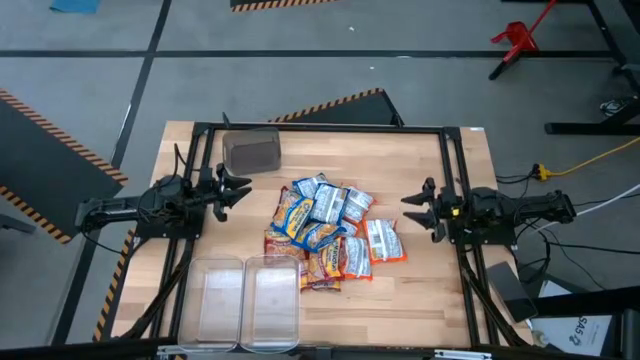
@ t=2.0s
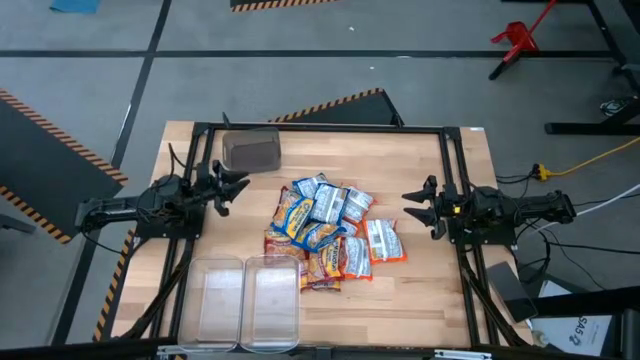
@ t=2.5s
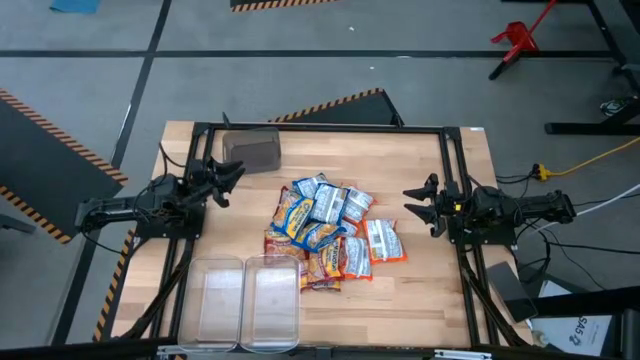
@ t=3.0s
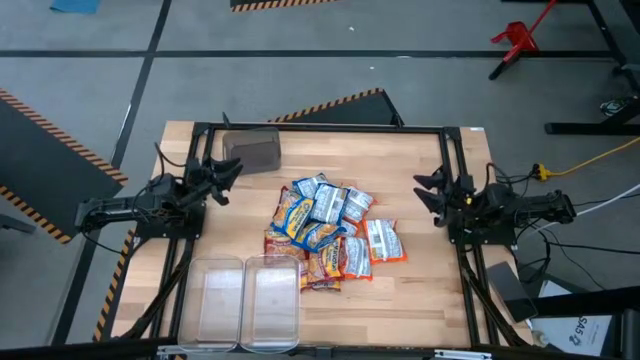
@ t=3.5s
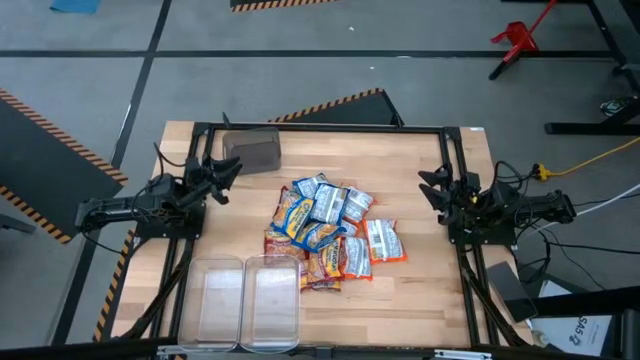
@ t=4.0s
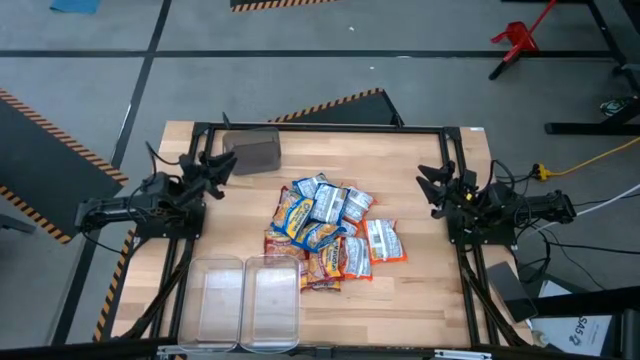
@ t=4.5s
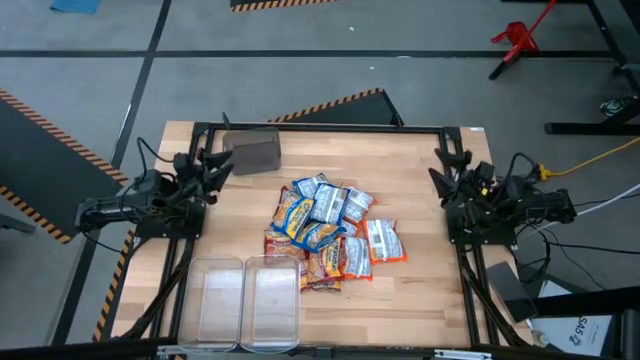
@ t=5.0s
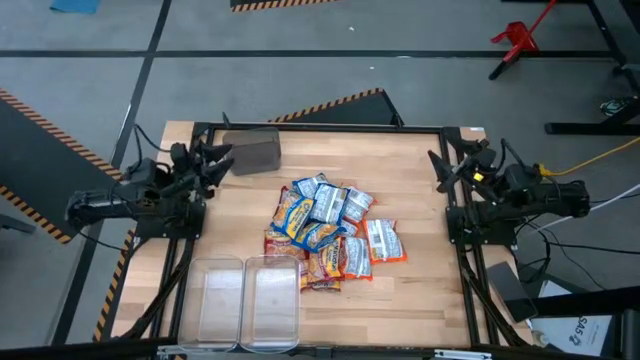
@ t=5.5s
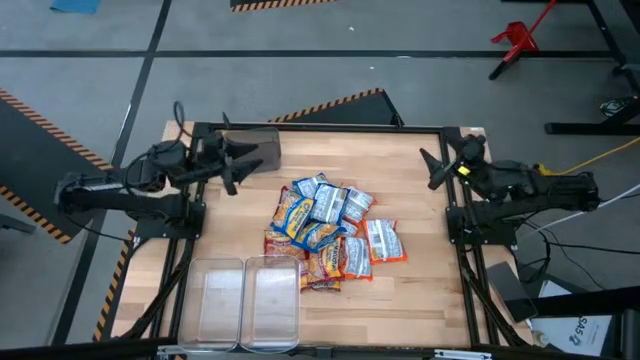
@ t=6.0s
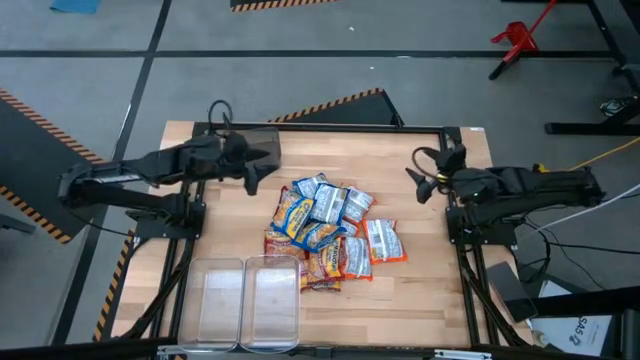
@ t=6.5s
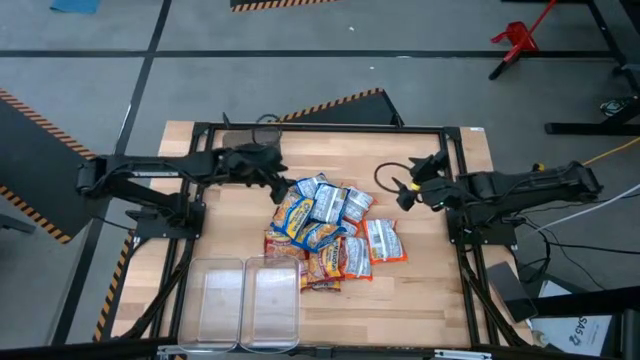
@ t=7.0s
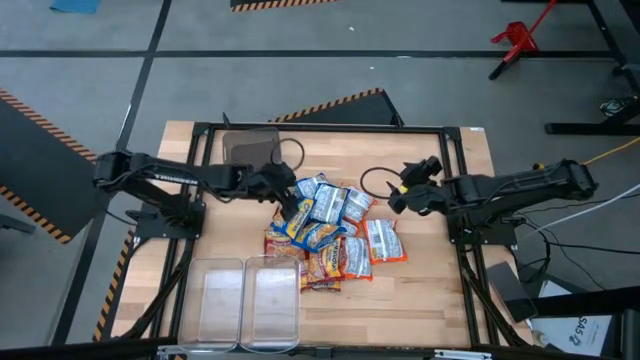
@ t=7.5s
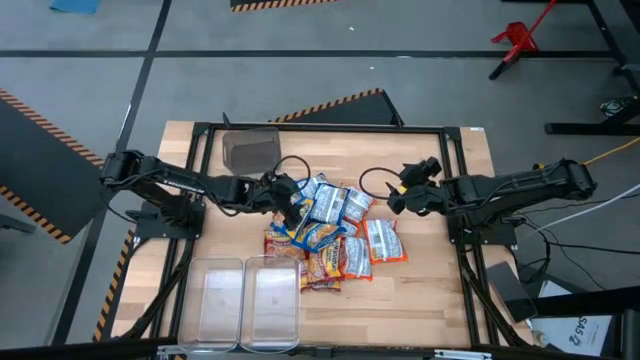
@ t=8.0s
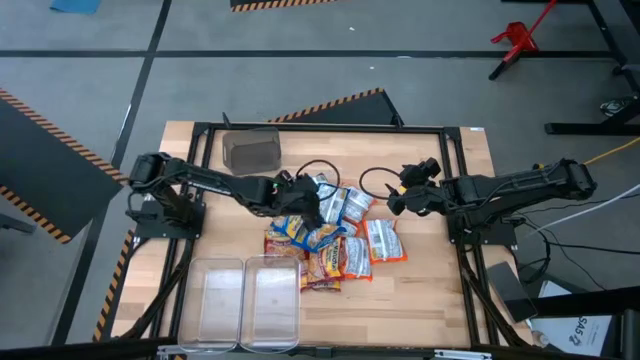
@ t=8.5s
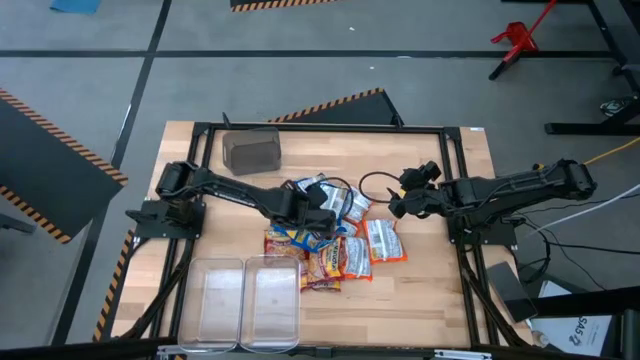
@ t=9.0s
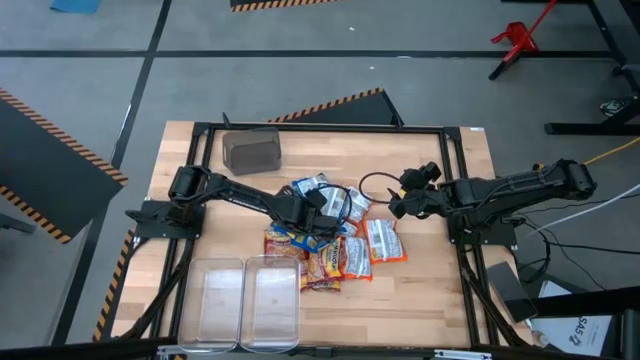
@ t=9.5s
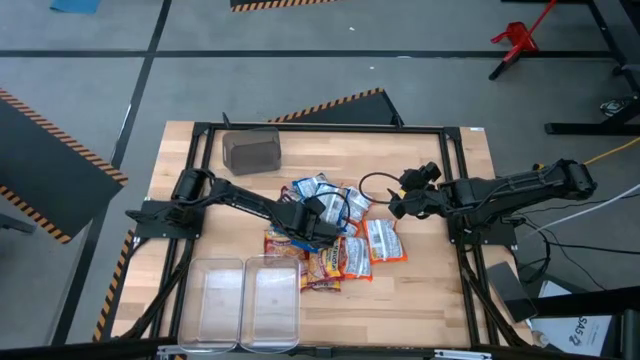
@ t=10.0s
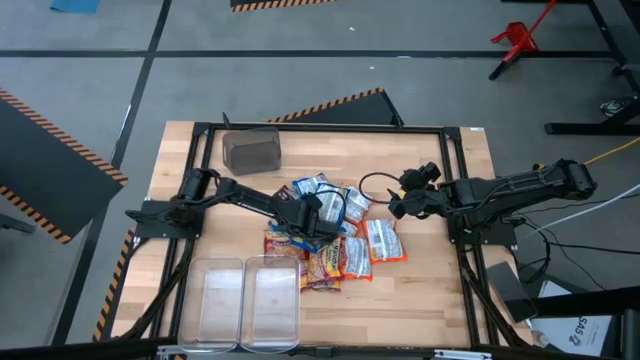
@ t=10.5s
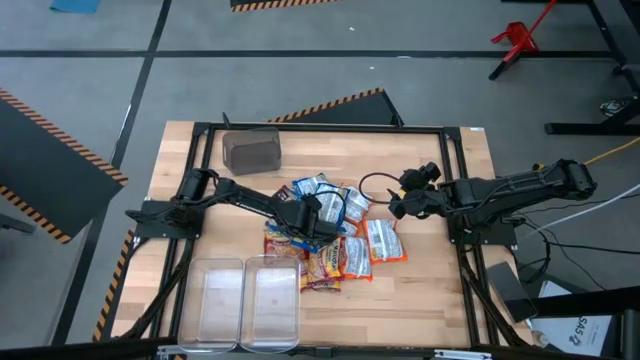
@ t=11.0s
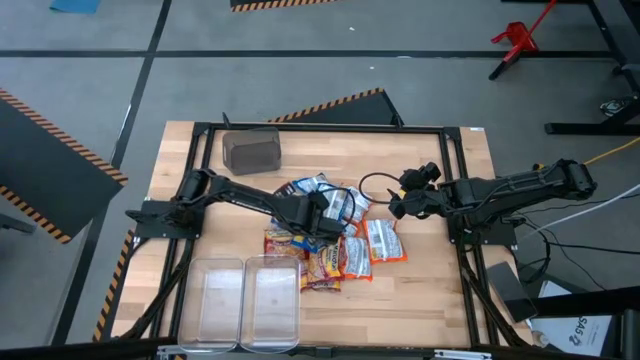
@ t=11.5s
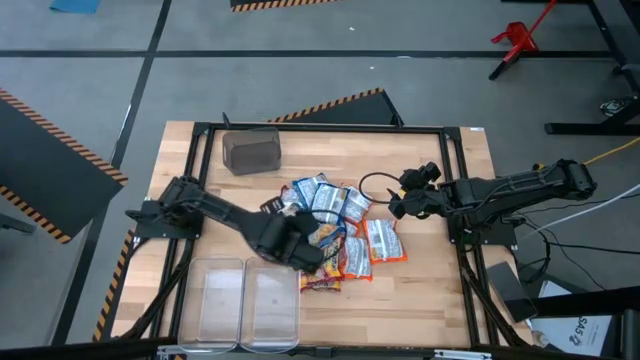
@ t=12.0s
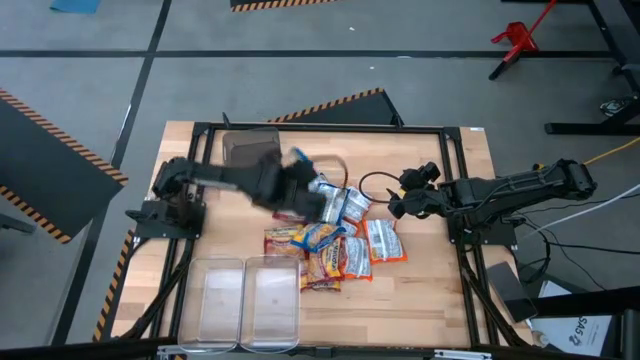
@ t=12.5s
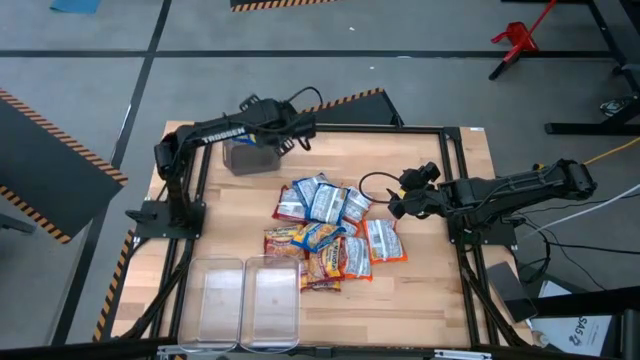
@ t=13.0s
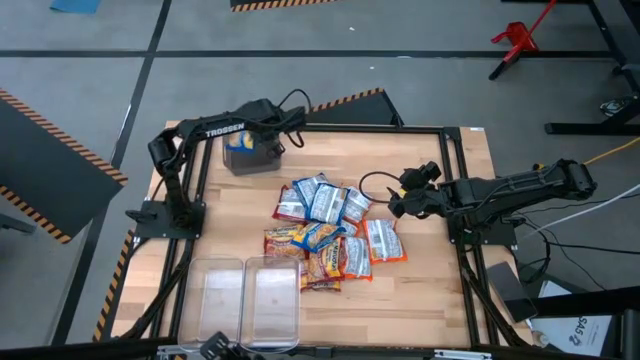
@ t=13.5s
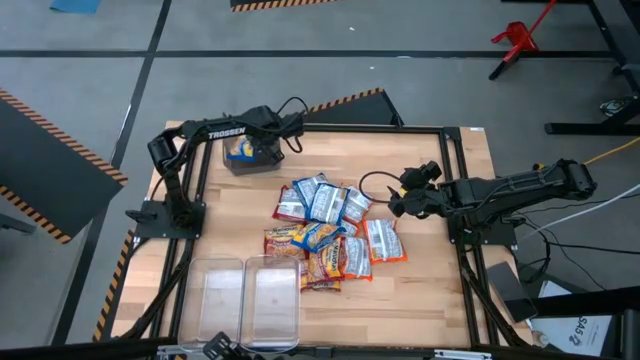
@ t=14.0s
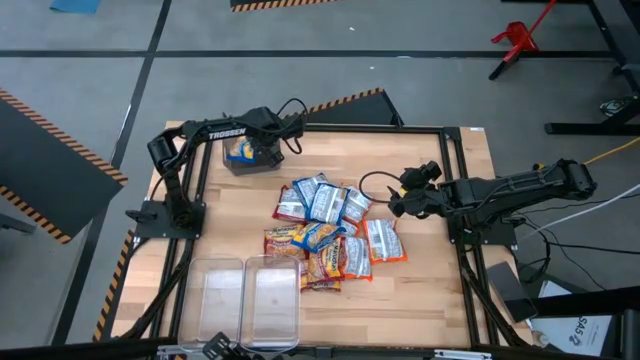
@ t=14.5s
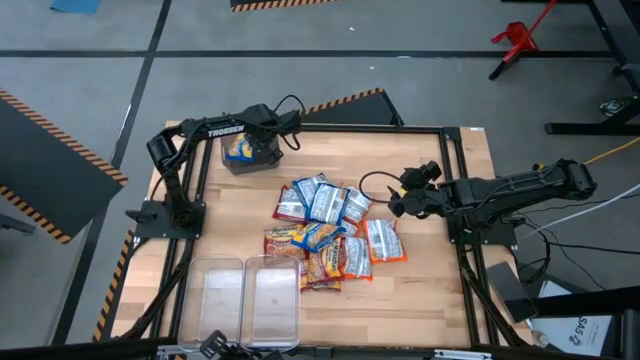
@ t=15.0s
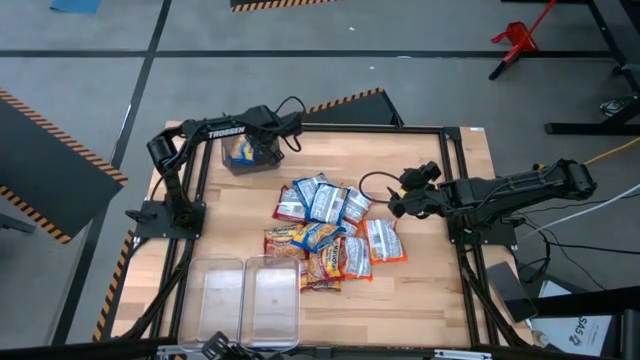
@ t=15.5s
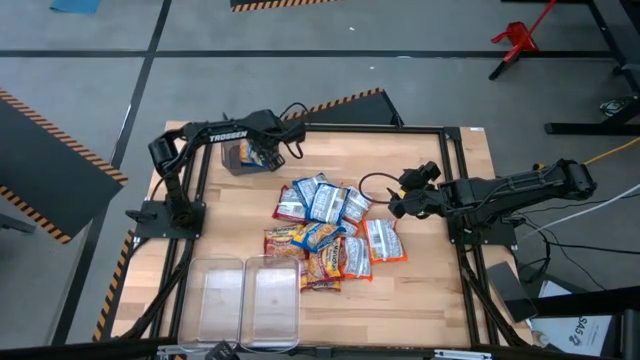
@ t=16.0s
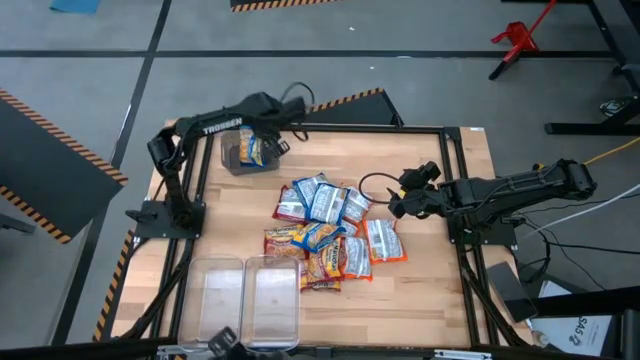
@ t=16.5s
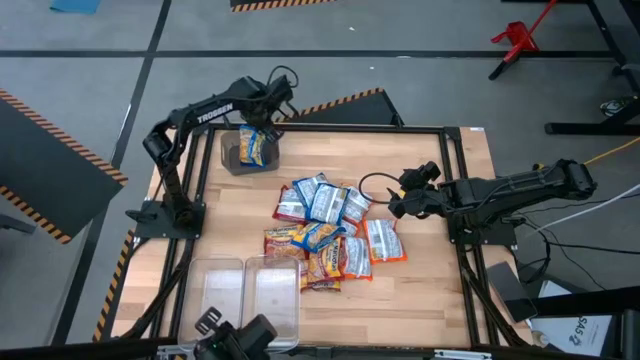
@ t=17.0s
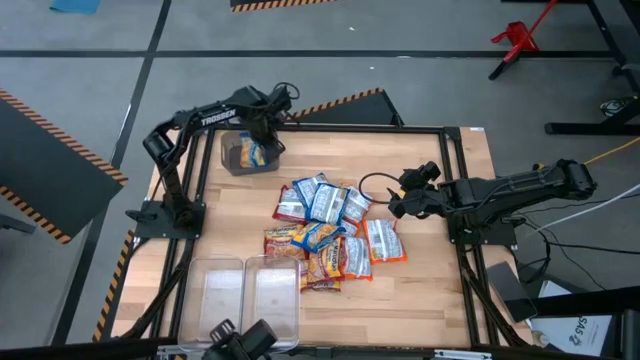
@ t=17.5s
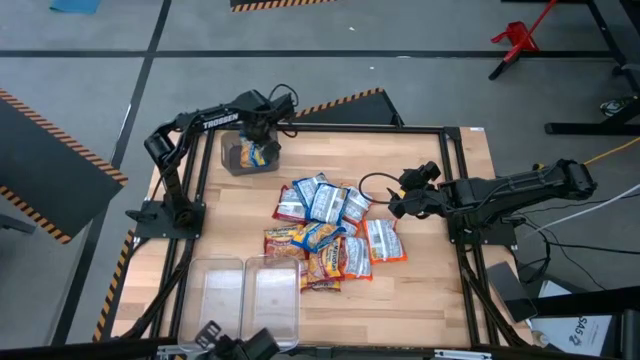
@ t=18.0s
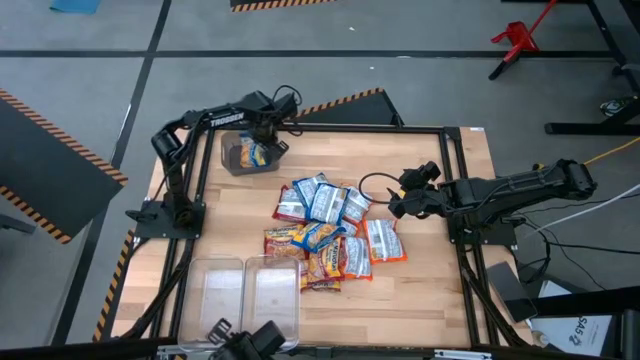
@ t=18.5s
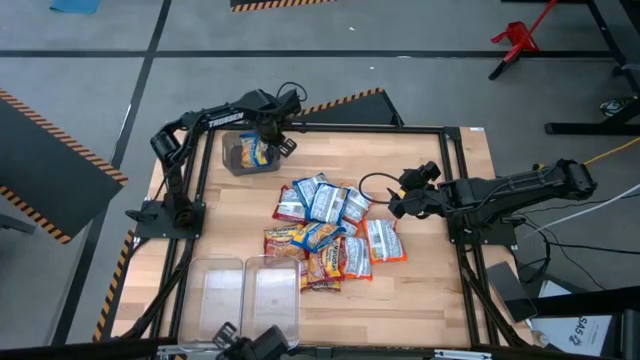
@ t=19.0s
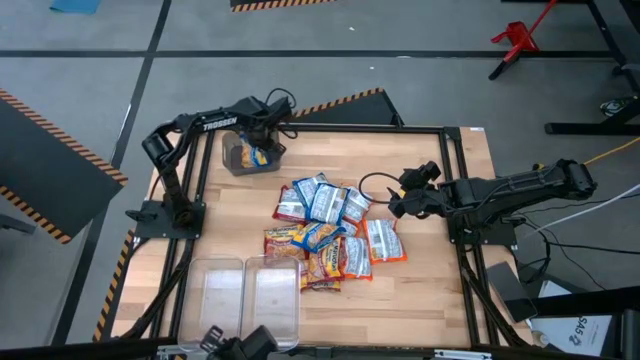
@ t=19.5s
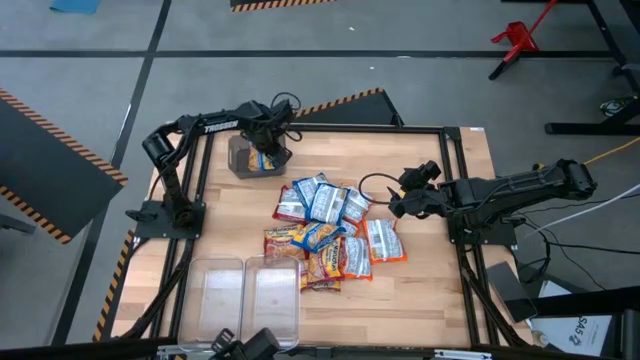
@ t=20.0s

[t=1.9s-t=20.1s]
Task: Sort Maruchan noodles
Put the blue noodle pack into the black bin
